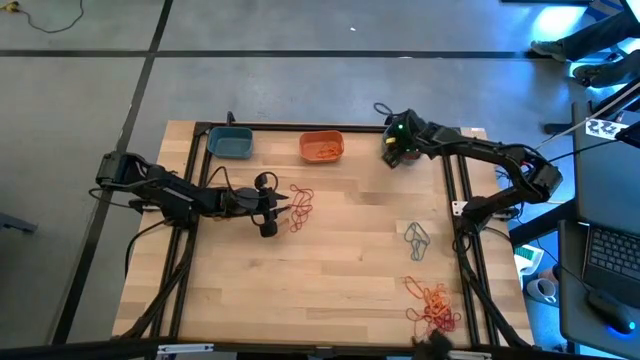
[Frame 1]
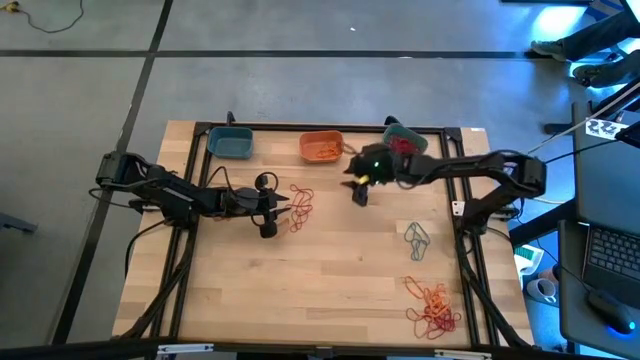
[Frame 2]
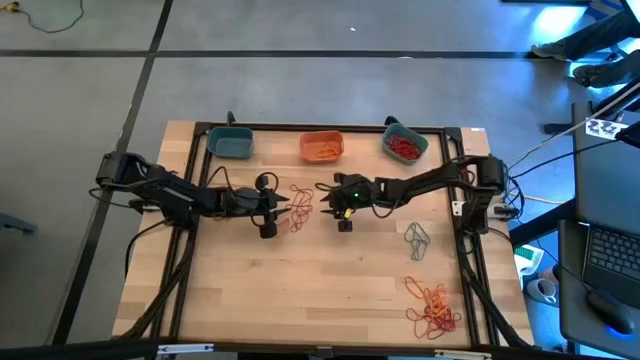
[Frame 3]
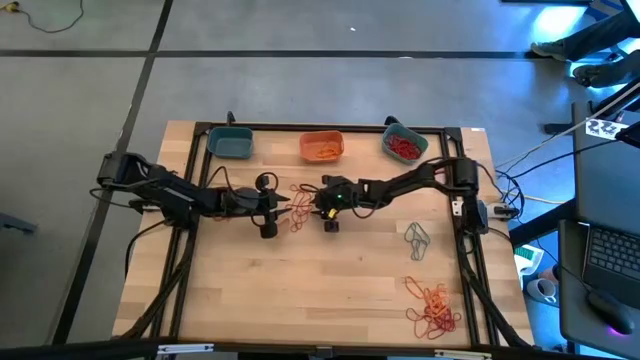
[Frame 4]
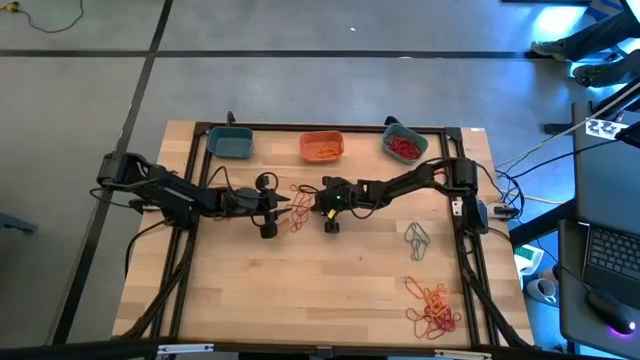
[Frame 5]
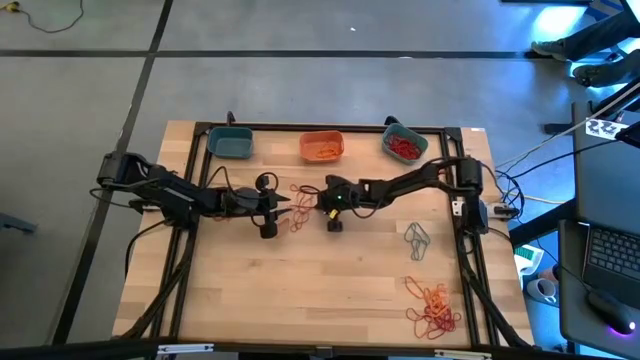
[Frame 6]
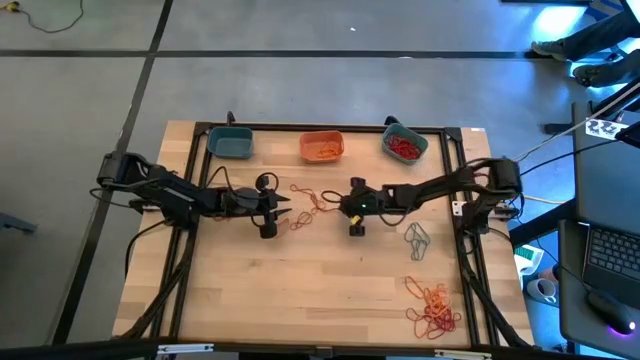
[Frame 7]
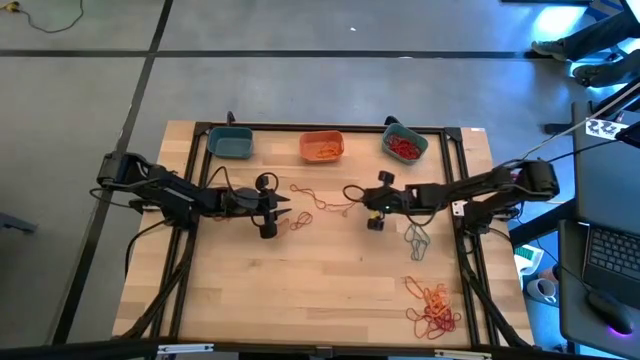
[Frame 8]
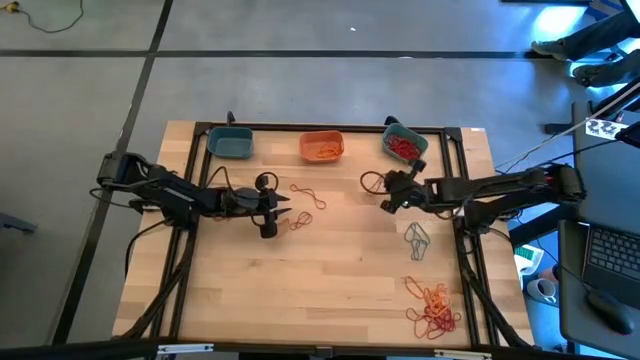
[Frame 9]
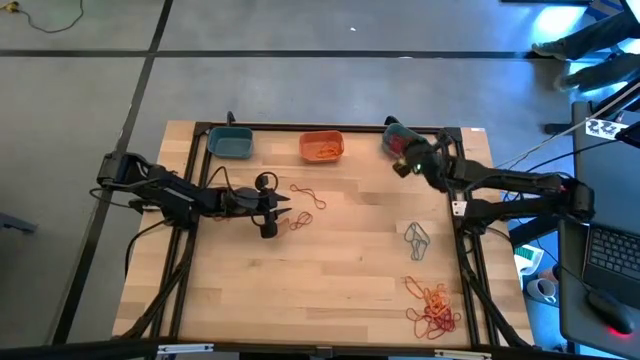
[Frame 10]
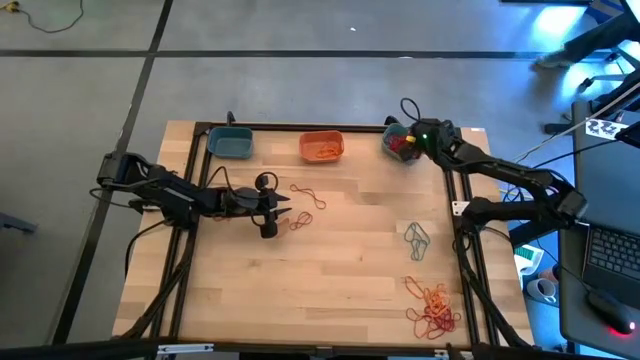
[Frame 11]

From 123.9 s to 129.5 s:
Task: Sort rubber bands into baskets
Put the red rubber band into the green bin

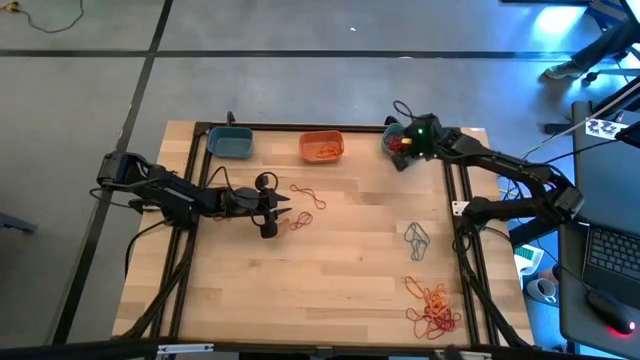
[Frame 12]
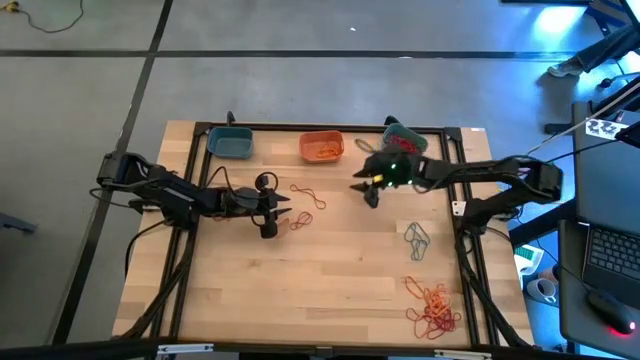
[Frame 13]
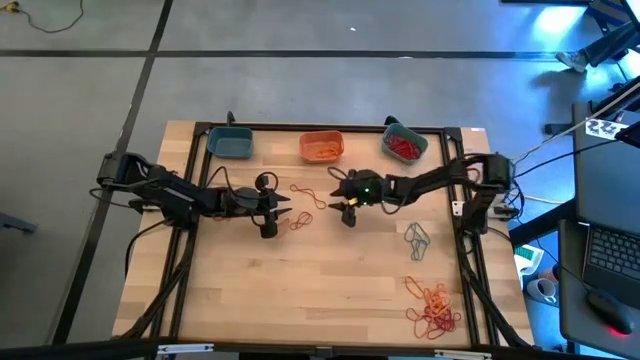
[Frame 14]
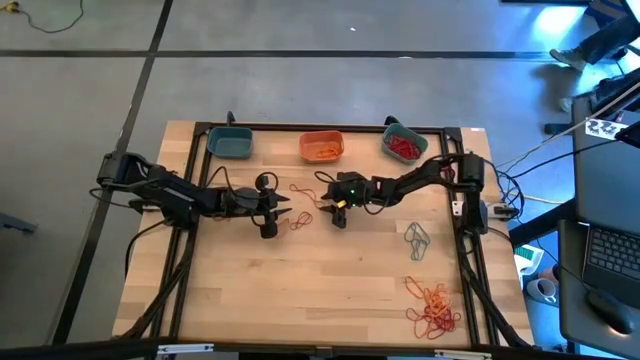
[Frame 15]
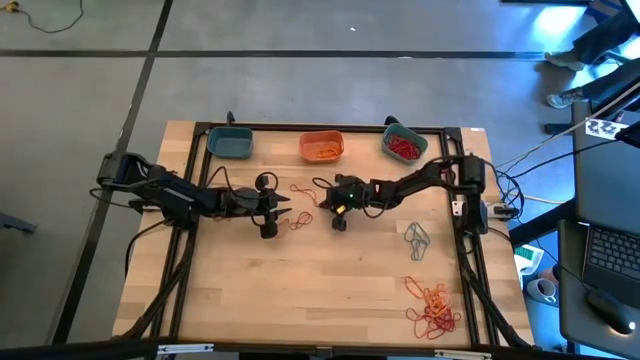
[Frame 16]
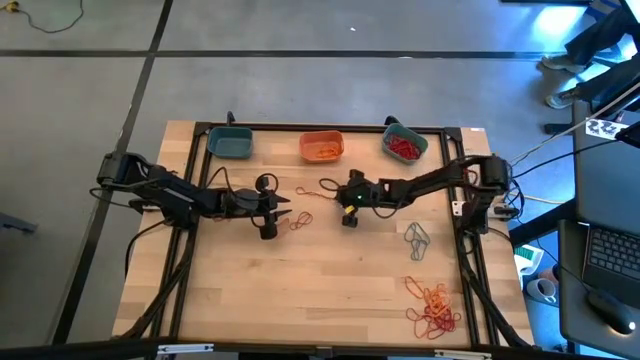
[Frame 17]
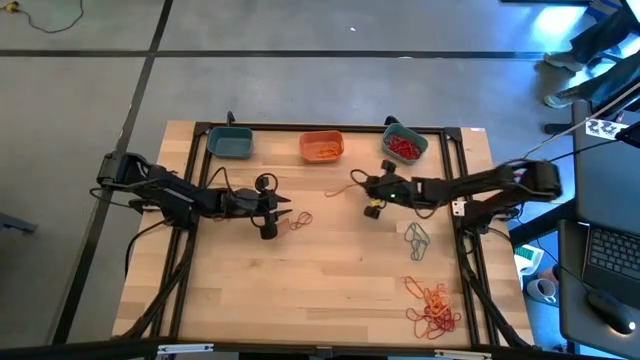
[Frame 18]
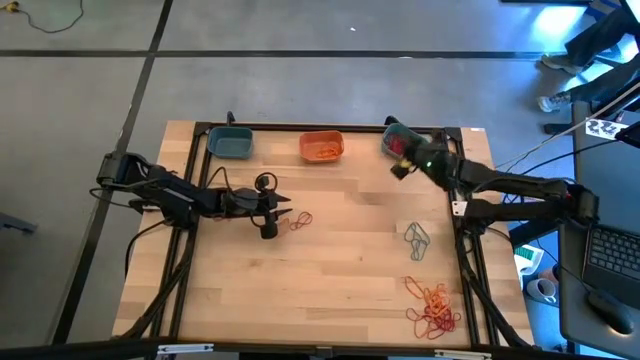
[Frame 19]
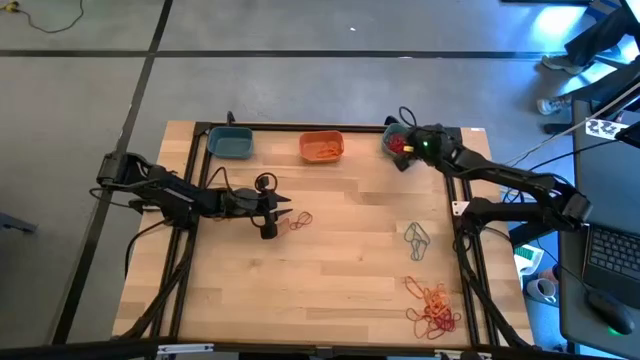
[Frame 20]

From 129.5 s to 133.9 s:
Put the red rubber band into the green bin

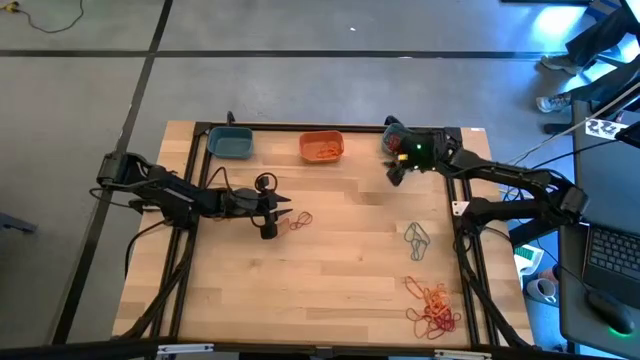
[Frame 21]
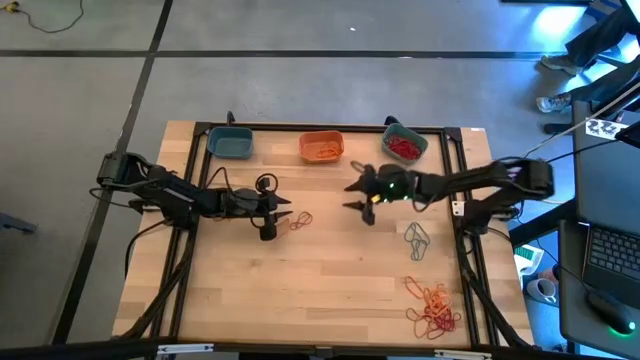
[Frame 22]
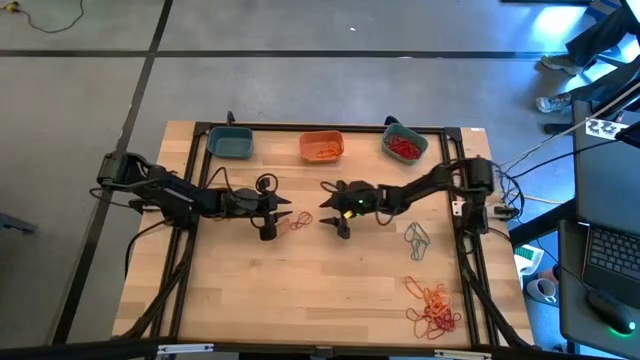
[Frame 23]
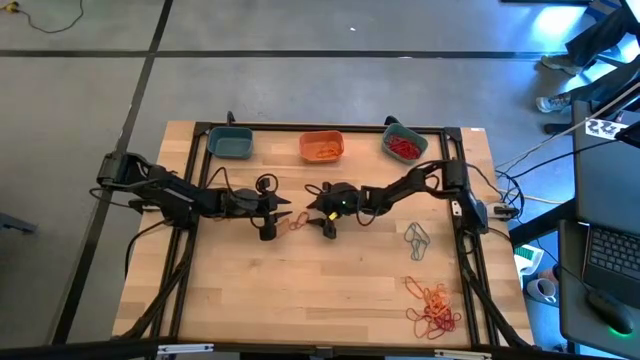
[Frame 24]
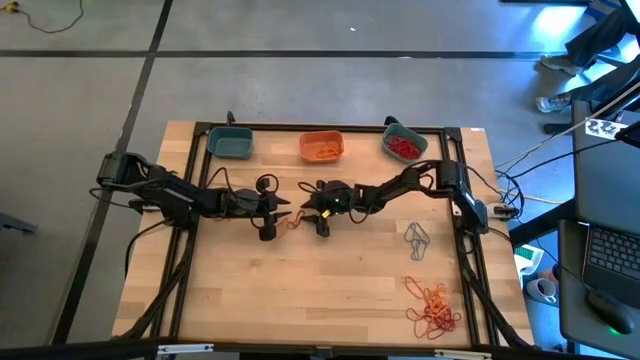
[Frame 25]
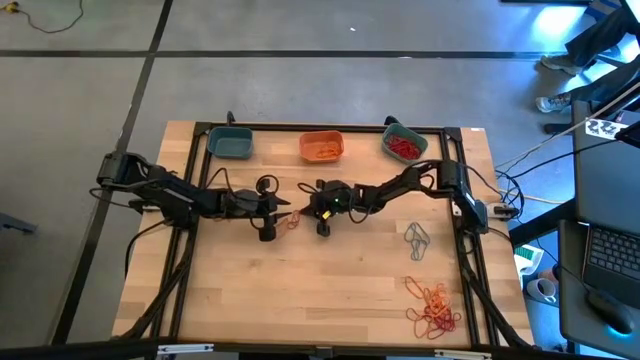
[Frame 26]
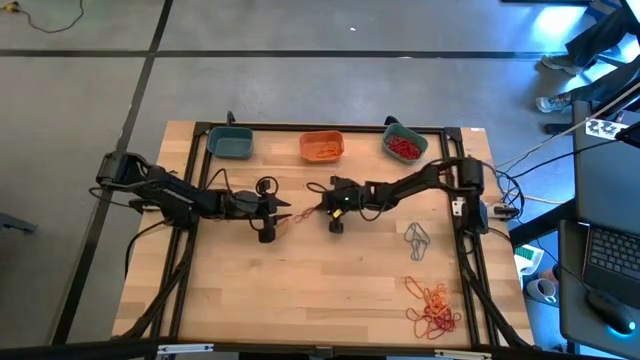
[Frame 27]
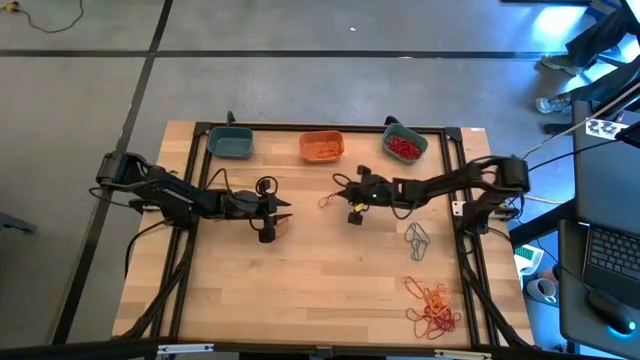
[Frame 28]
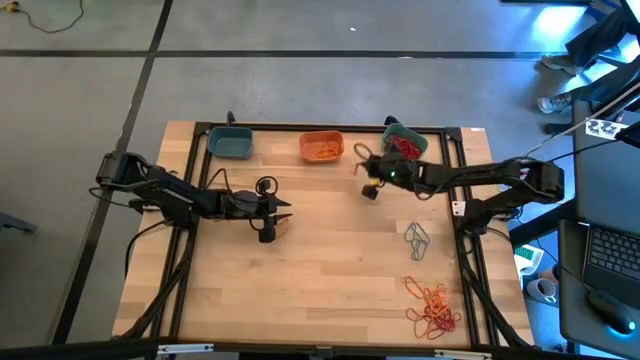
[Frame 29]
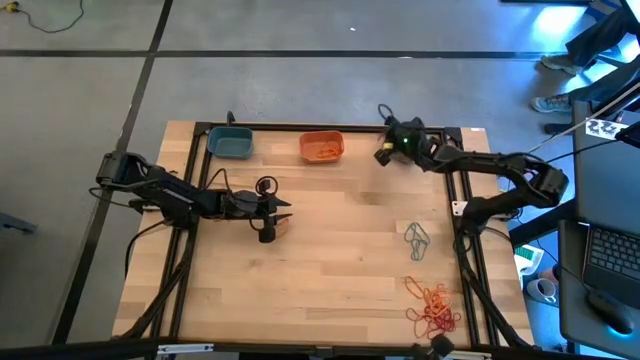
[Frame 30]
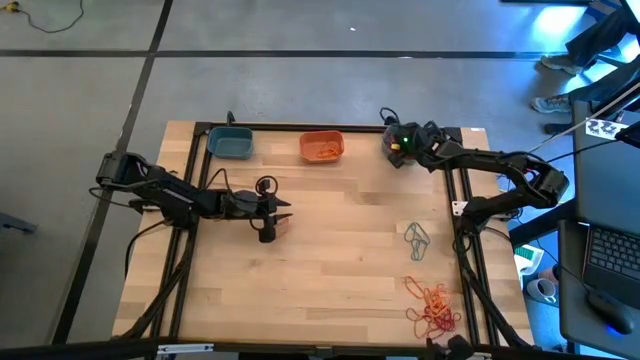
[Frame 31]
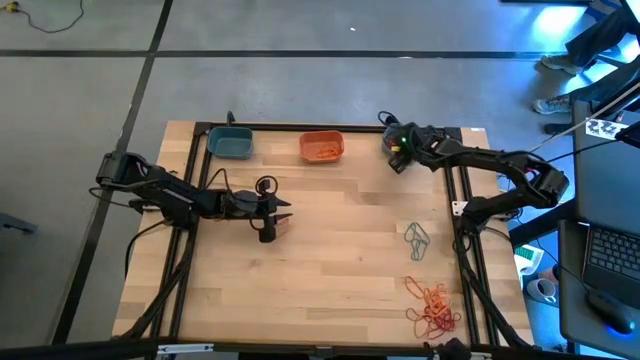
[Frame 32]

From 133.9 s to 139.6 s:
Put the red rubber band into the green bin

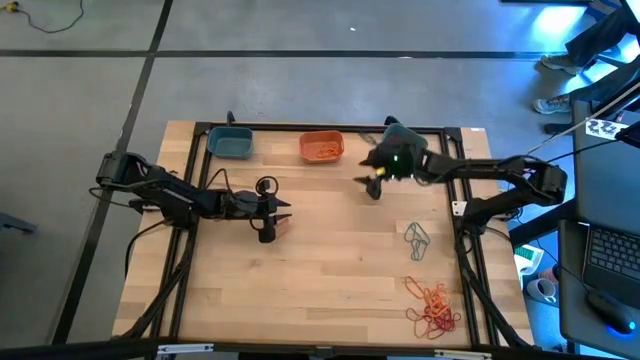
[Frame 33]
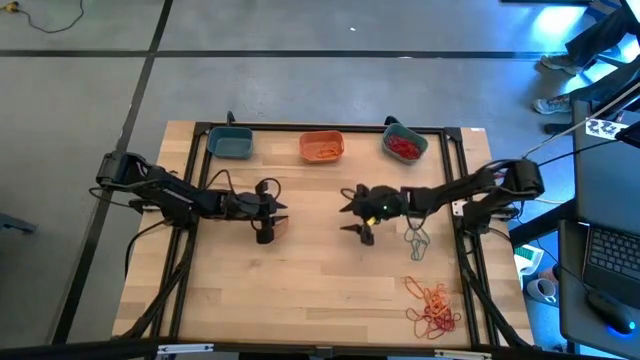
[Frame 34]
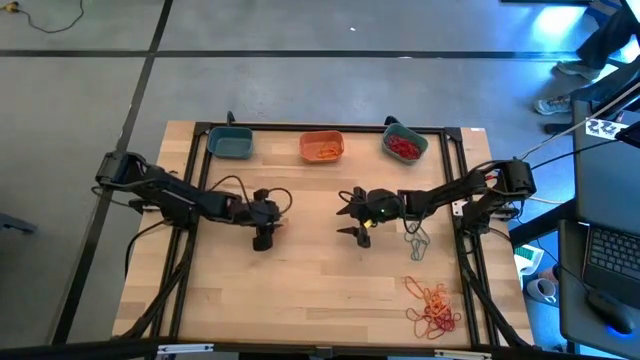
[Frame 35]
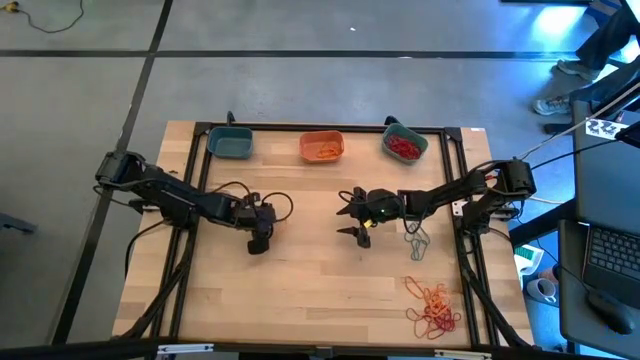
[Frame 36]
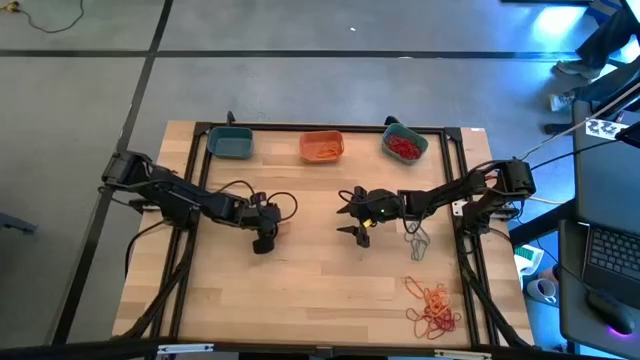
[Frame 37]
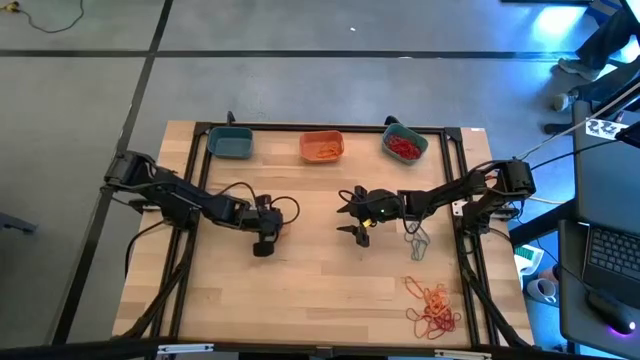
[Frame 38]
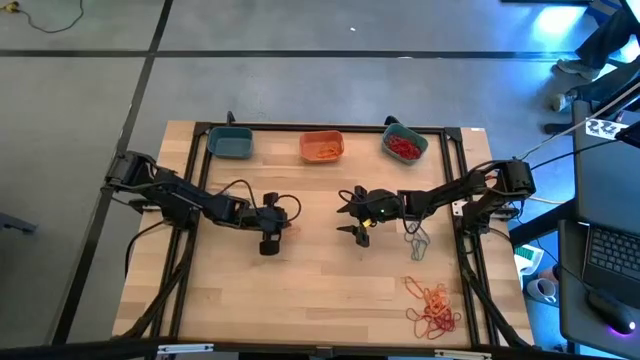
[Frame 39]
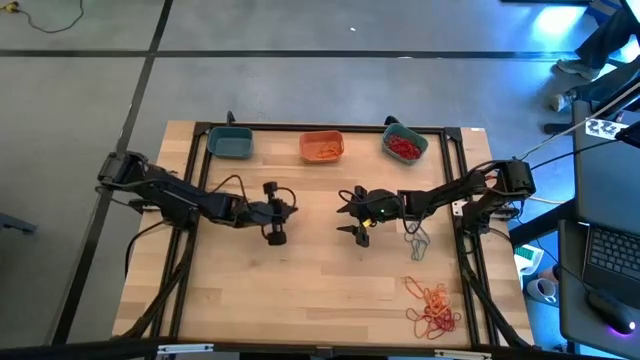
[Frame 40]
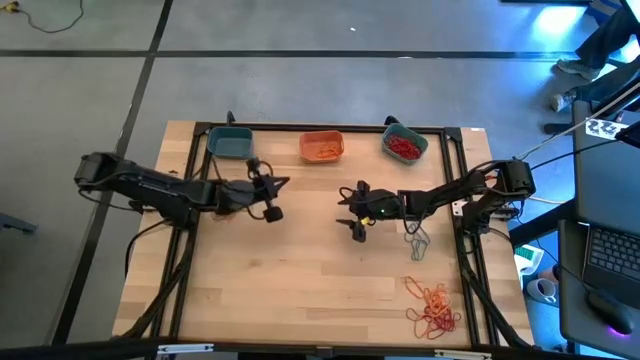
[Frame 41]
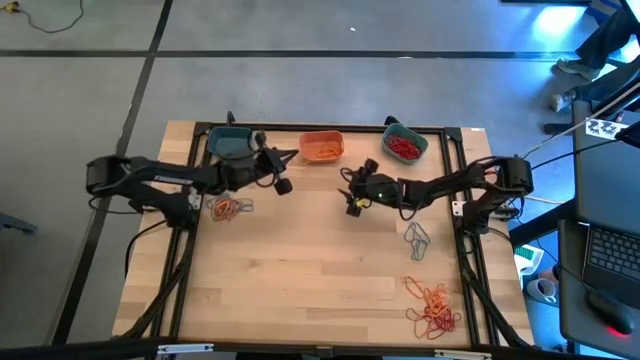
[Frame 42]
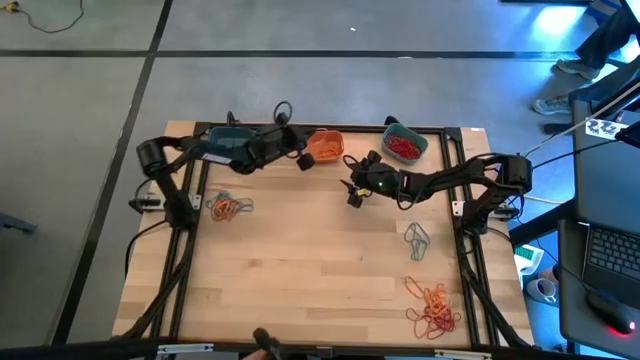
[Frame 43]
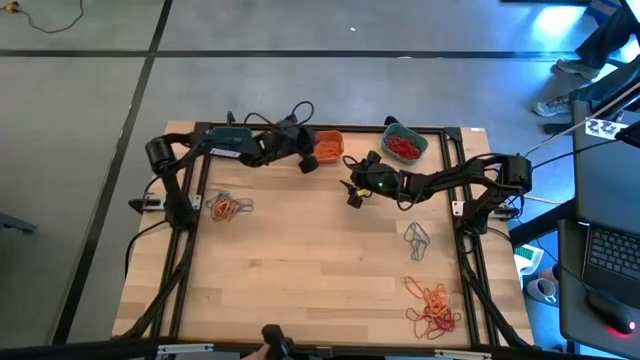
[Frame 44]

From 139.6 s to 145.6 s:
Put the orange rubber band into the orange bin
